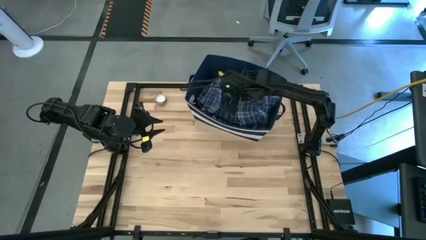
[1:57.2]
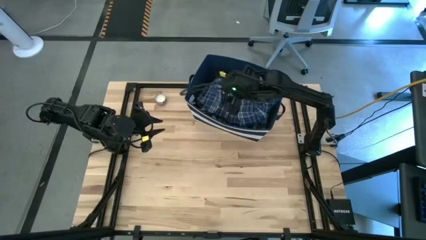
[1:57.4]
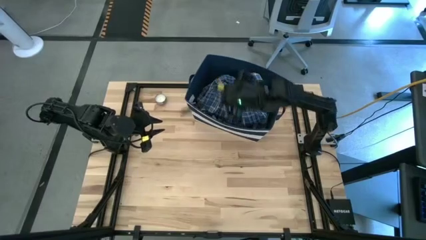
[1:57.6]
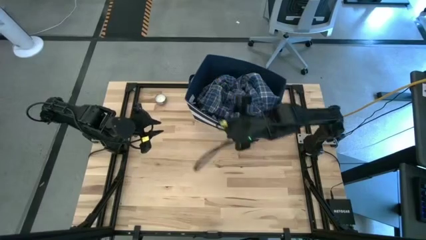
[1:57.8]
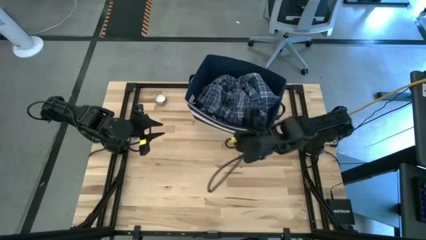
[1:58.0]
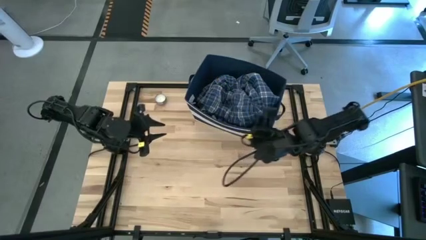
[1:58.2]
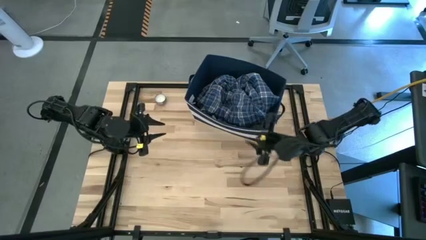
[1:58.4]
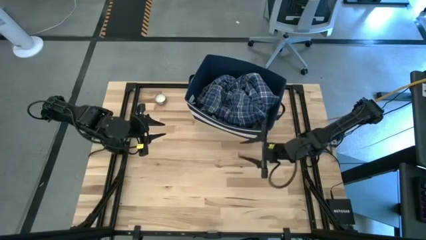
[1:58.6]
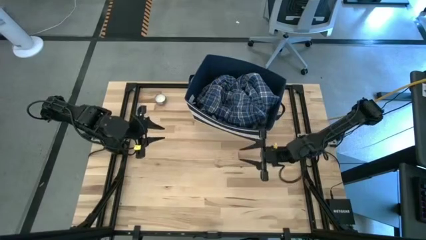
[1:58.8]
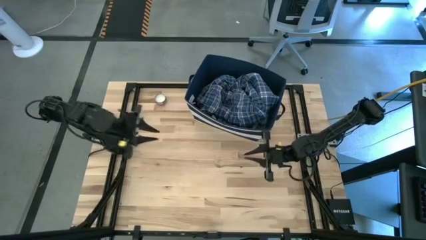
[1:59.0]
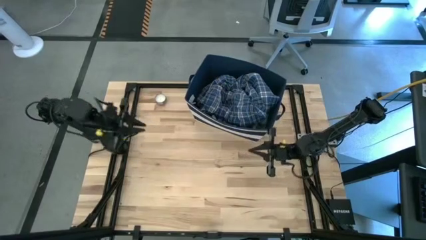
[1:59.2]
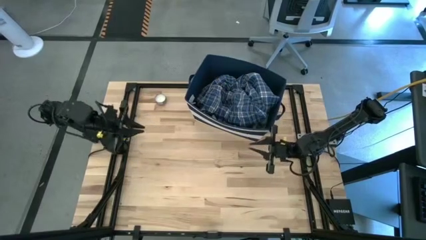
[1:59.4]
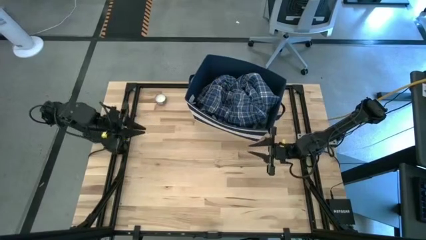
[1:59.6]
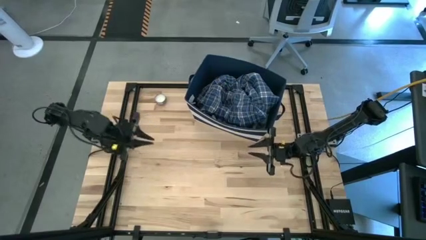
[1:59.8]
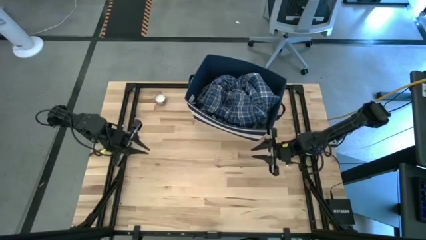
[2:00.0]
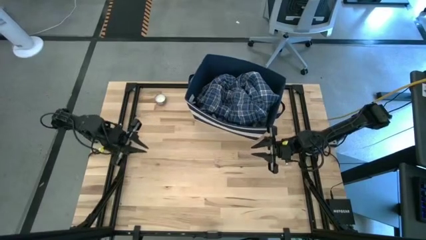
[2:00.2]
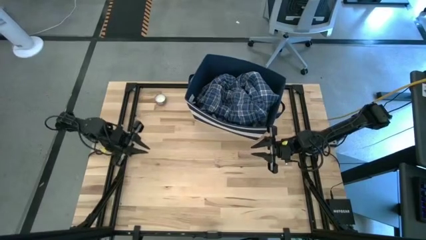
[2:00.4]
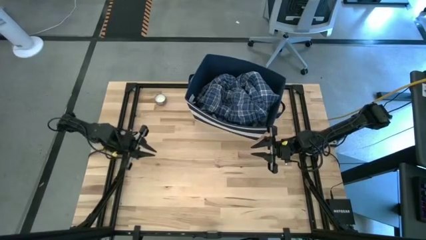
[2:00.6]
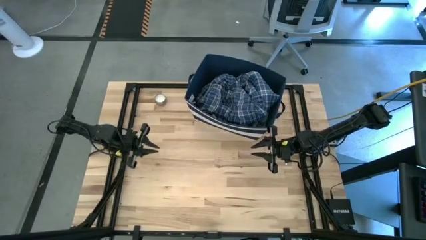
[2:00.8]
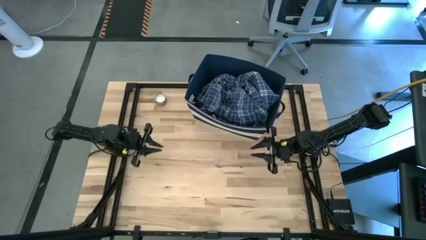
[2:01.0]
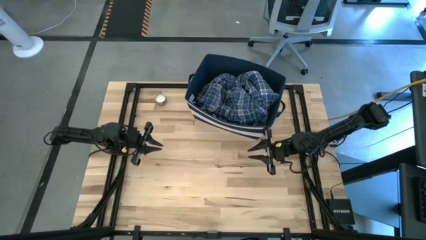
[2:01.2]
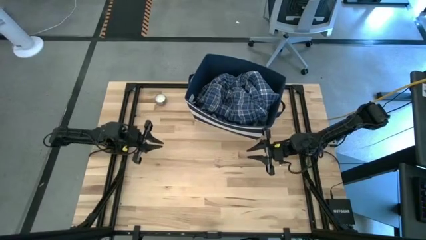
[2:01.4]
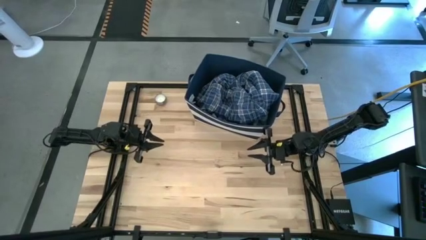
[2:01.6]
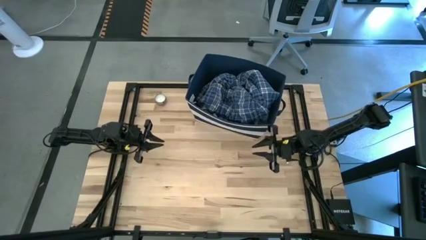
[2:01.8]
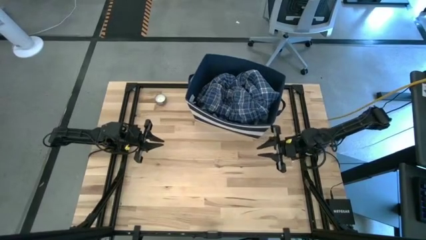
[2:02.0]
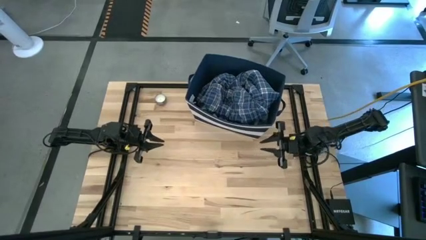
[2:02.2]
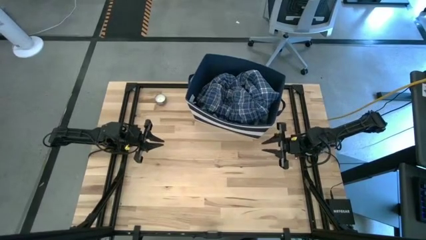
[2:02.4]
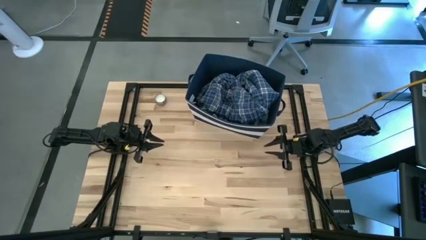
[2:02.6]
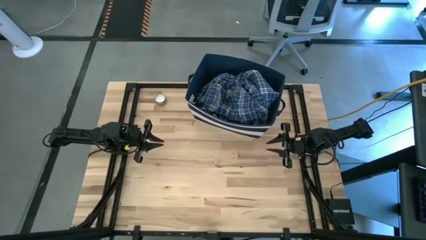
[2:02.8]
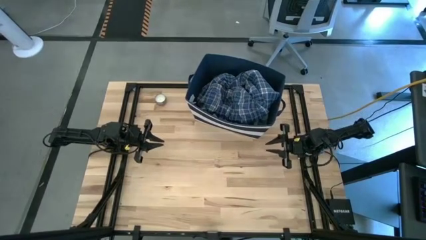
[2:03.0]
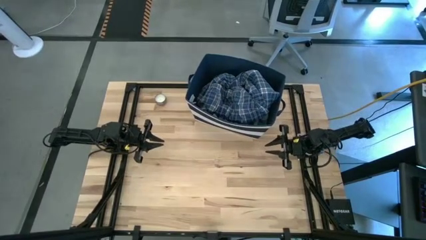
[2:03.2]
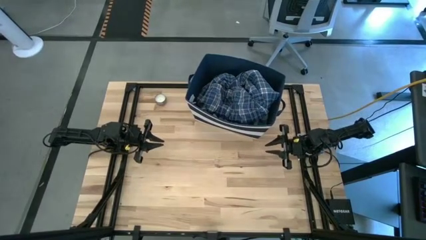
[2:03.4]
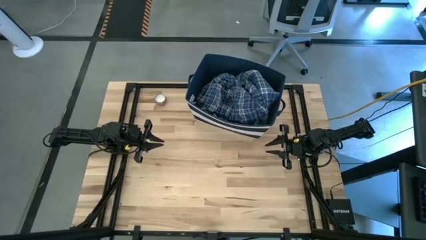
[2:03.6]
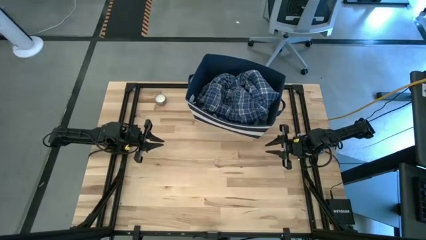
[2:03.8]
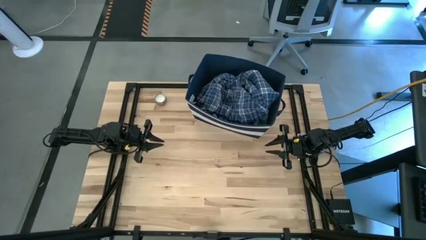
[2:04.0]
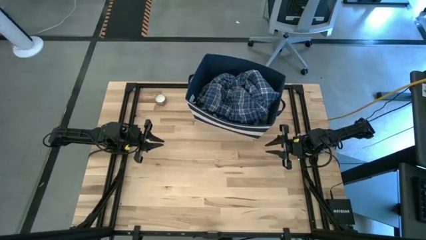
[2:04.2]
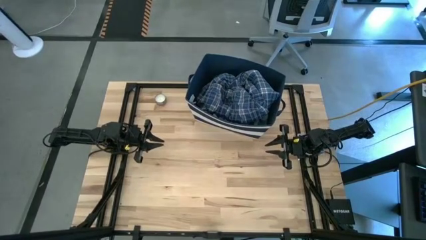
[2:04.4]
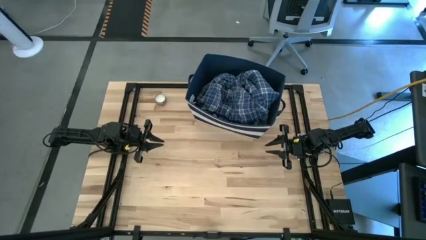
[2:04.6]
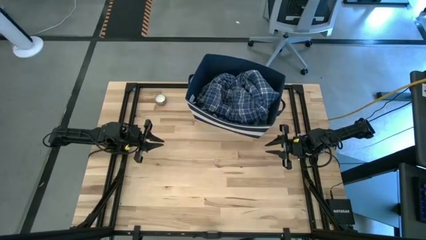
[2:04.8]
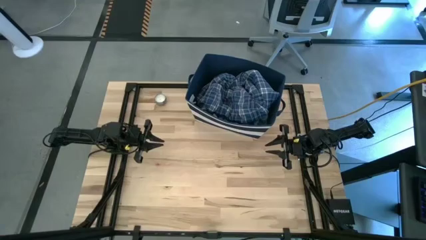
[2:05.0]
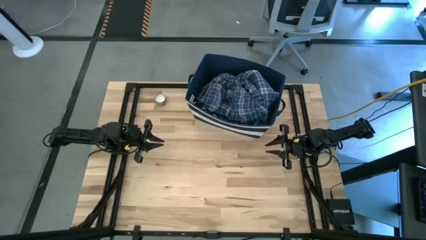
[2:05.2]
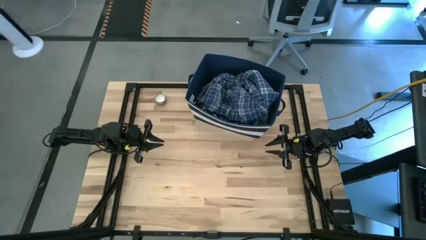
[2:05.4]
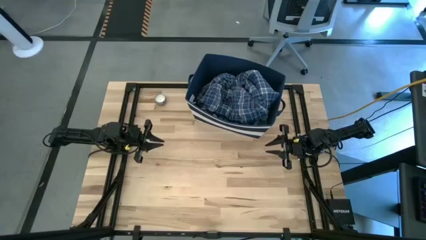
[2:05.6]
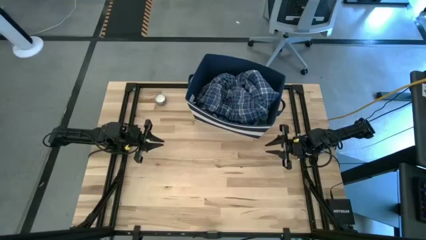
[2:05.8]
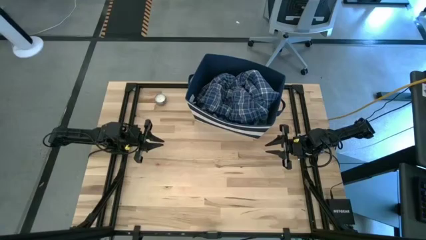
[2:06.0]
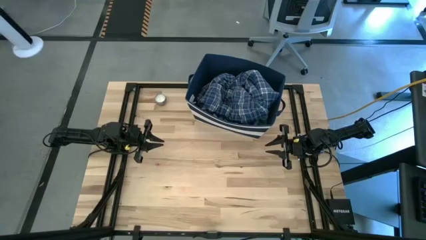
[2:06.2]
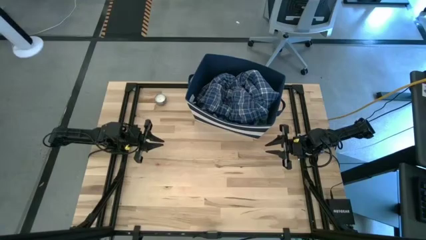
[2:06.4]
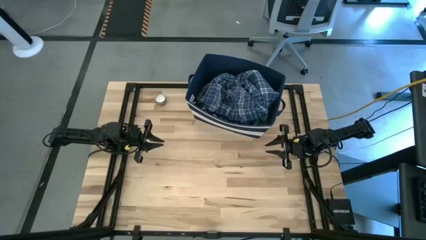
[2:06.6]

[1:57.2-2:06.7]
Task: Sort clothes
Return to Home Position

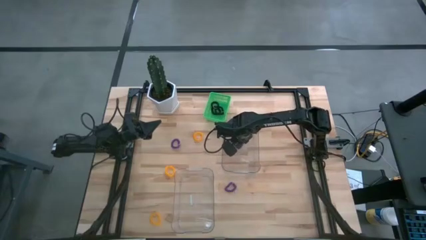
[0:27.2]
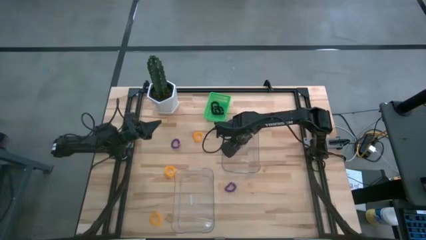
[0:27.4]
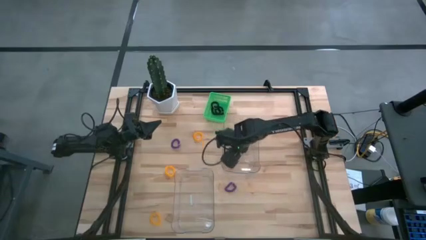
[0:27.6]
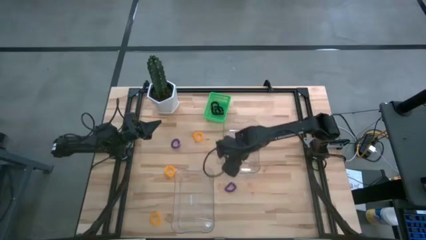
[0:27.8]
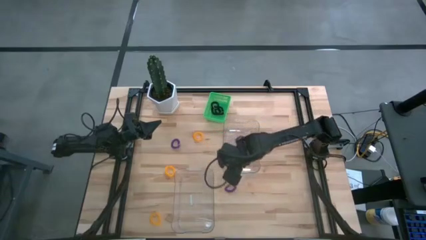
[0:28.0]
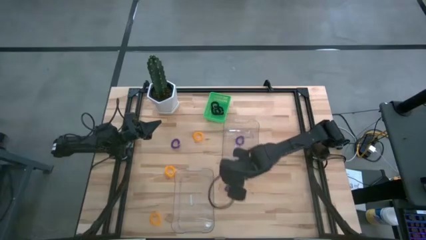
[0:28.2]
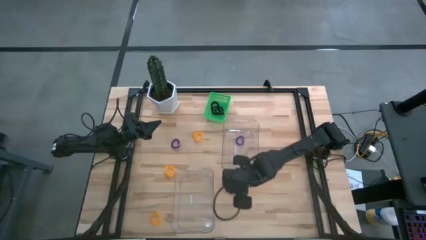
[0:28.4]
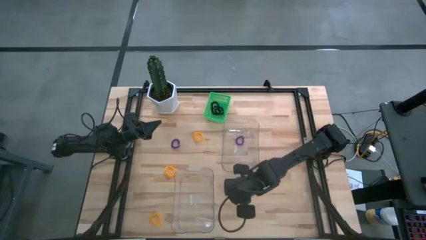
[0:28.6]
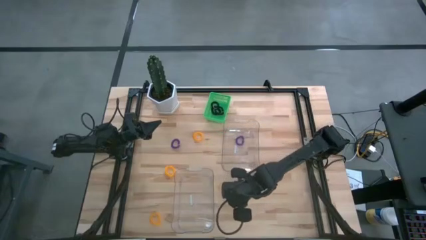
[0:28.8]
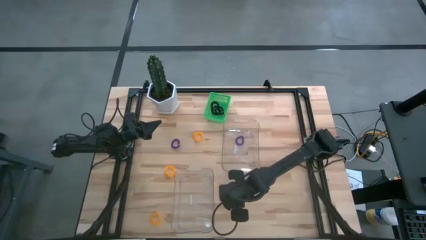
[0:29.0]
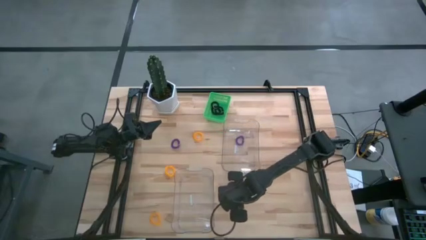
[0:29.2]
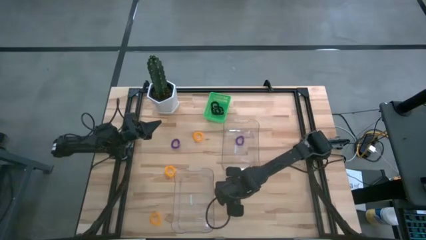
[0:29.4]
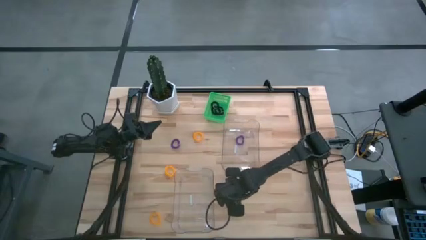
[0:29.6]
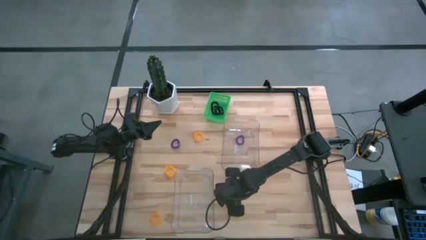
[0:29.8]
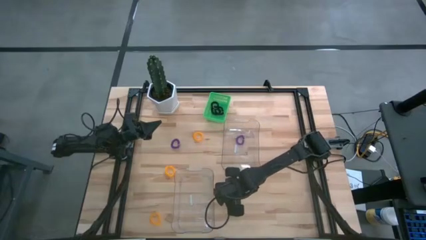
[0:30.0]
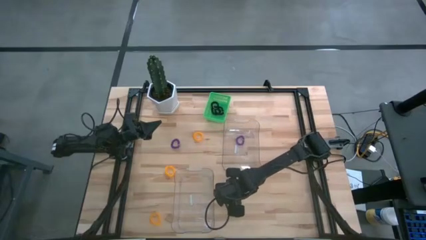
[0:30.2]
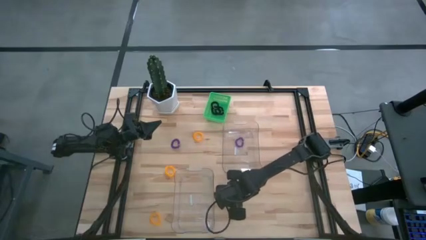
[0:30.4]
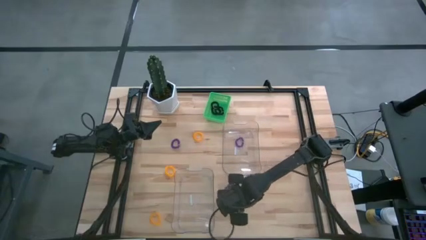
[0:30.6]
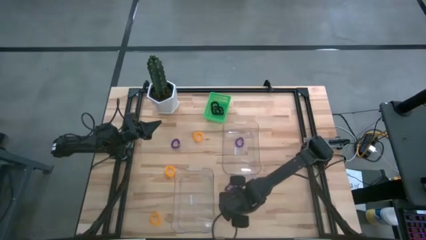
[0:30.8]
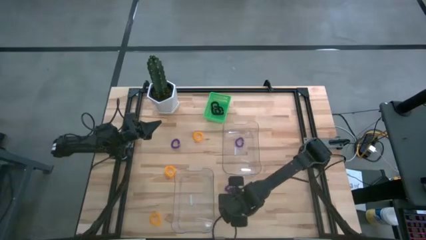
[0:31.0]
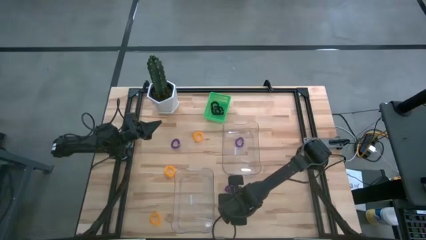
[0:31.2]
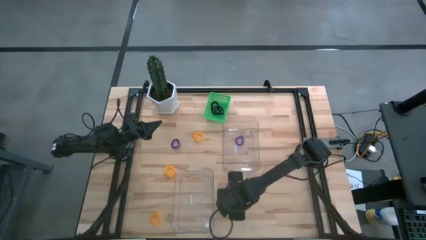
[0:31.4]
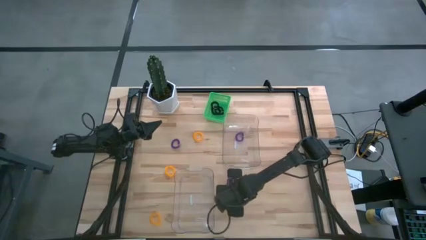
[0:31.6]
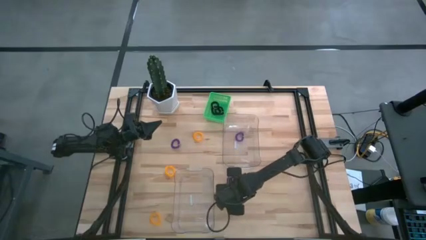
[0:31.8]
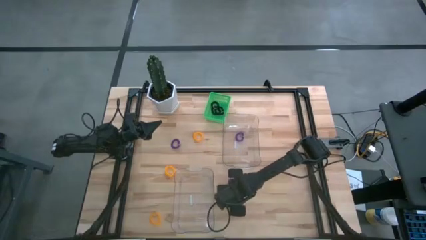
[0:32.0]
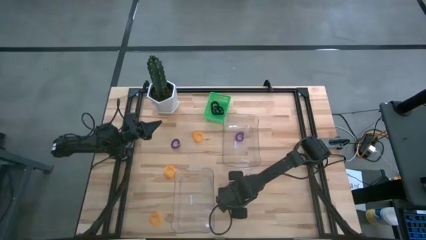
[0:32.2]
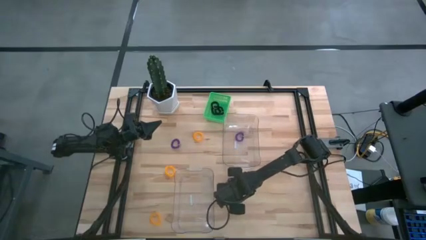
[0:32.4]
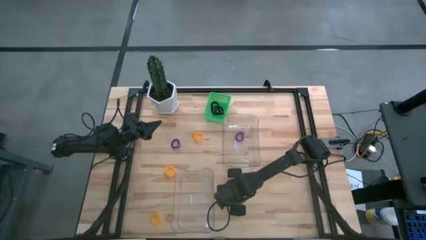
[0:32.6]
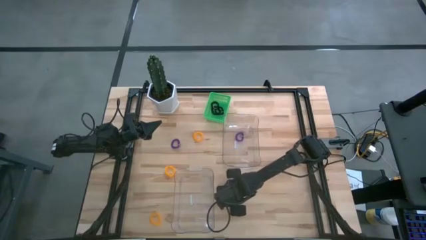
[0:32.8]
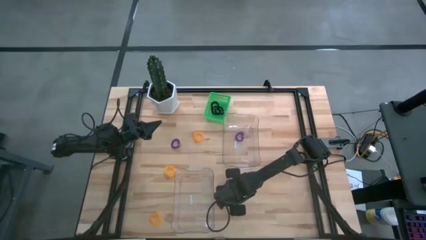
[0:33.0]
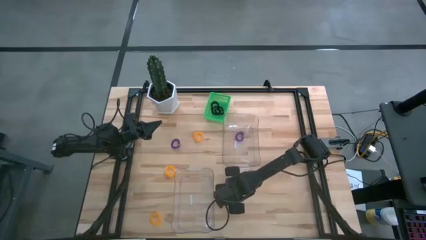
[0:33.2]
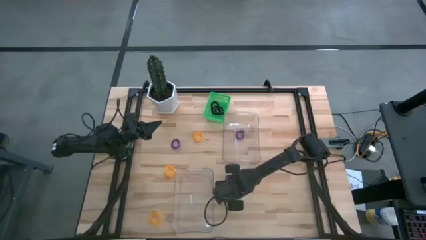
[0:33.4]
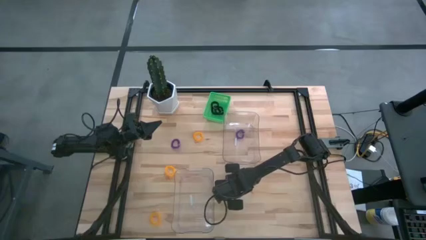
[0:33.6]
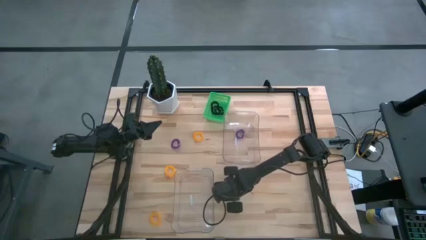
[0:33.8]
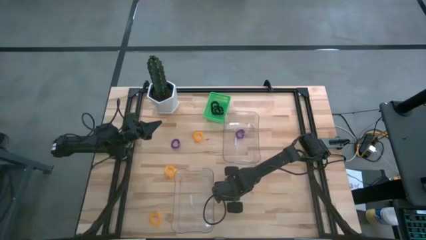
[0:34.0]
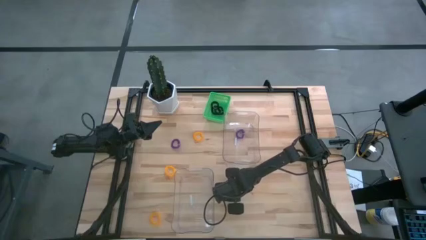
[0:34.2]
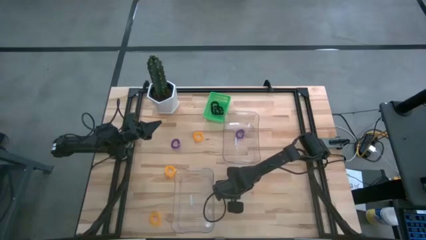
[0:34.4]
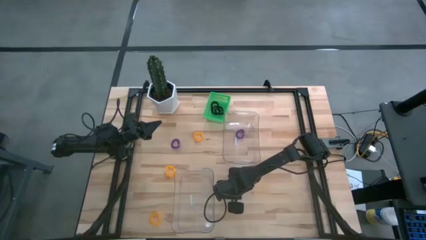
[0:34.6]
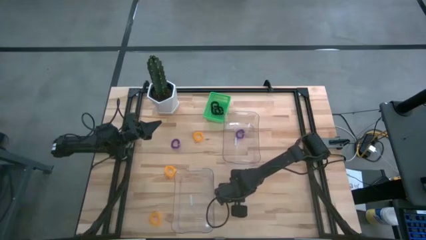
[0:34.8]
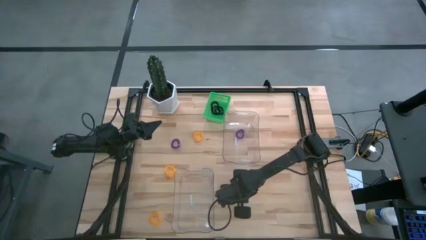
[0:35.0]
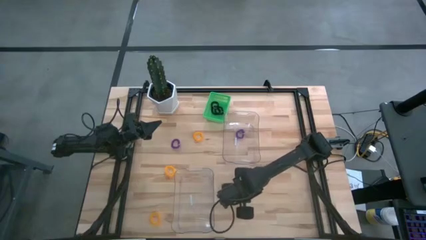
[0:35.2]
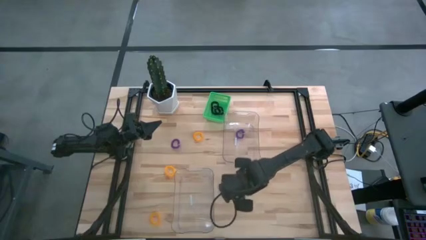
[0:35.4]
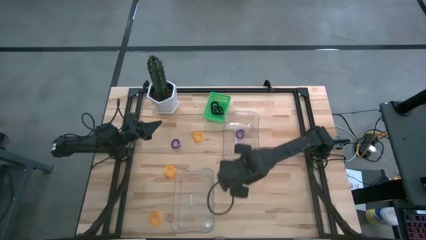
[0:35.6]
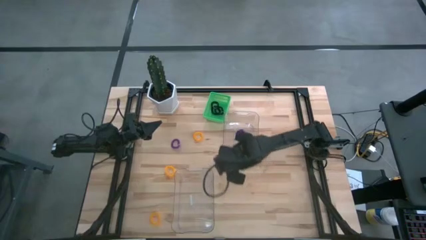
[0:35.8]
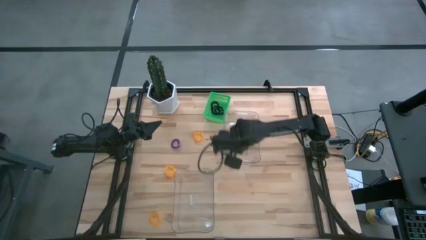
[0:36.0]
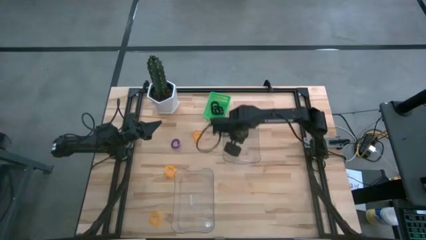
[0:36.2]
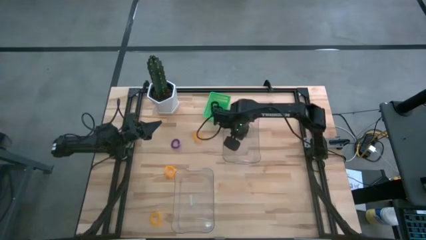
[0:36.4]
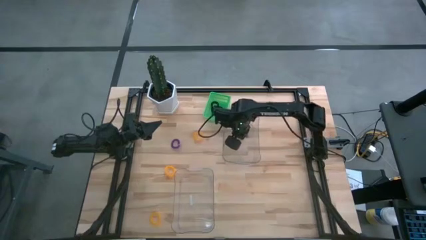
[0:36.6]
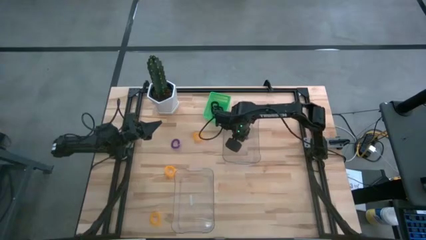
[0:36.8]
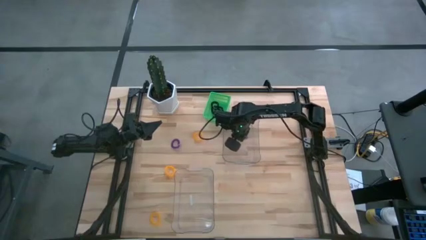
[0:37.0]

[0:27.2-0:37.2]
Task: Sort spring keychains
Put the bottom violet spring keychain into the top transparent bin
